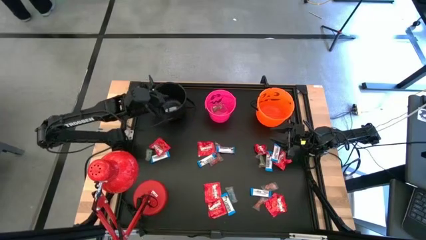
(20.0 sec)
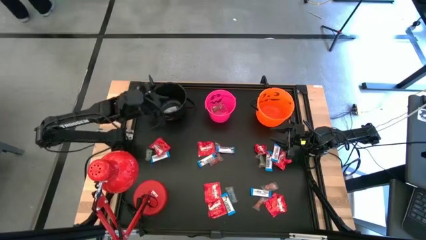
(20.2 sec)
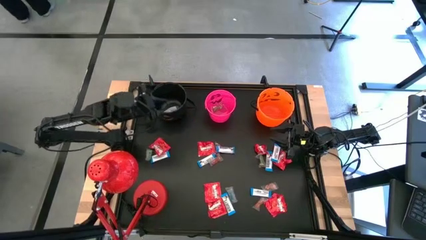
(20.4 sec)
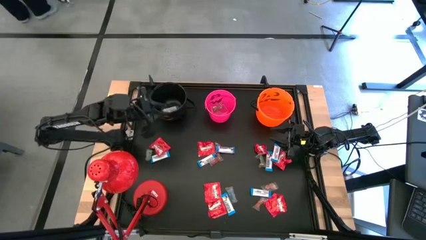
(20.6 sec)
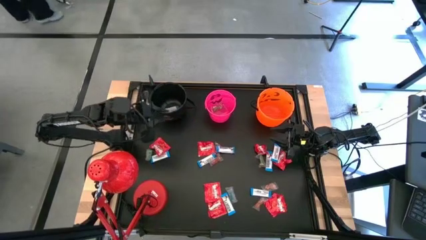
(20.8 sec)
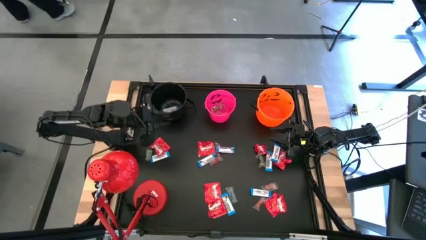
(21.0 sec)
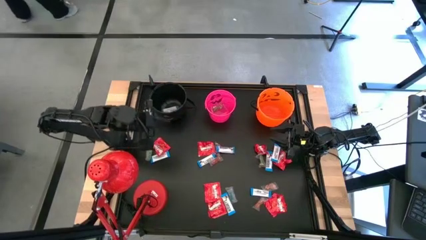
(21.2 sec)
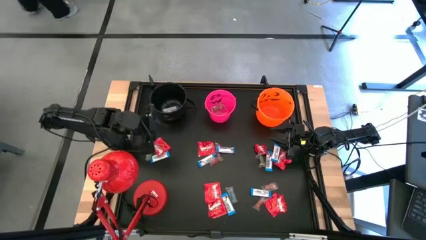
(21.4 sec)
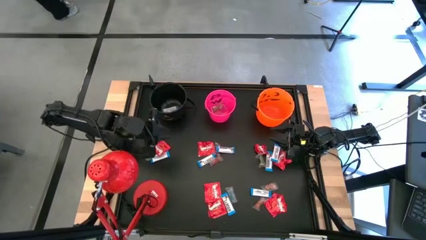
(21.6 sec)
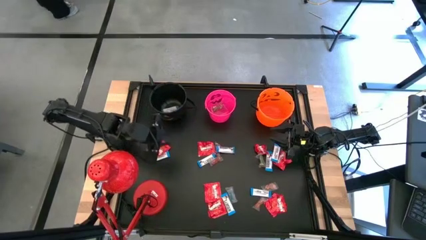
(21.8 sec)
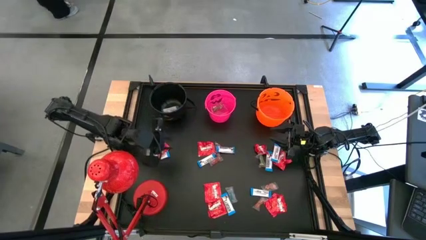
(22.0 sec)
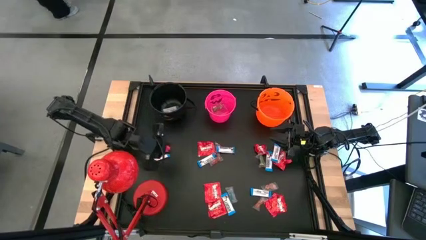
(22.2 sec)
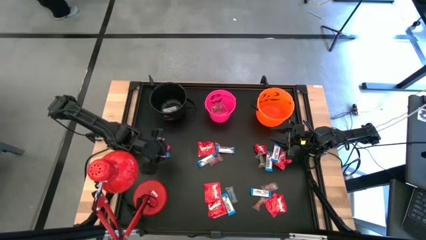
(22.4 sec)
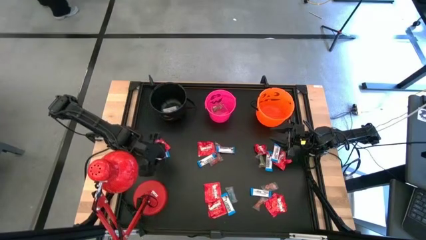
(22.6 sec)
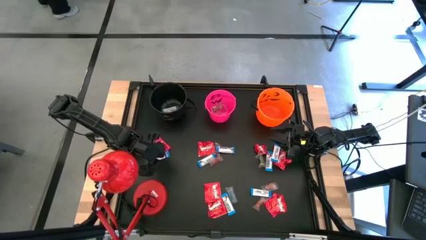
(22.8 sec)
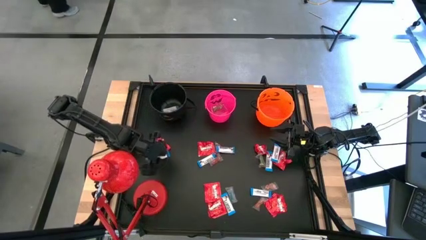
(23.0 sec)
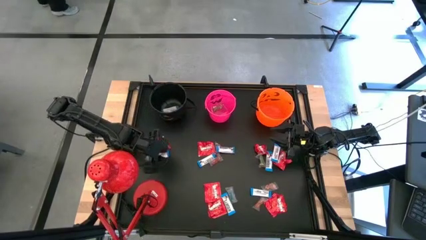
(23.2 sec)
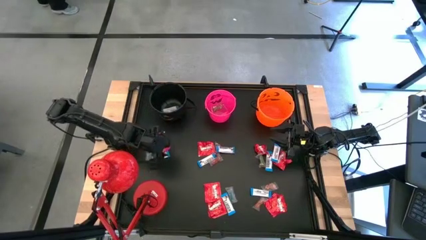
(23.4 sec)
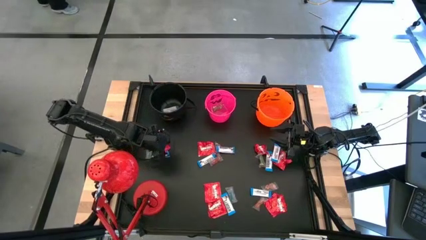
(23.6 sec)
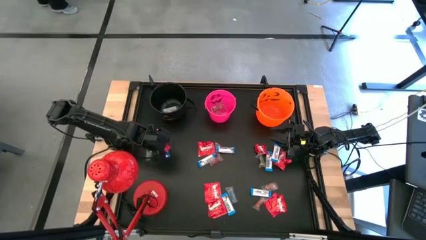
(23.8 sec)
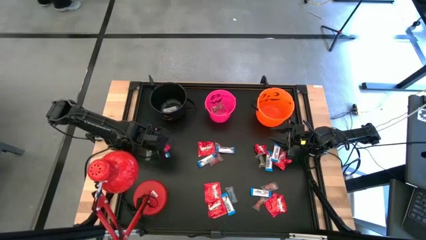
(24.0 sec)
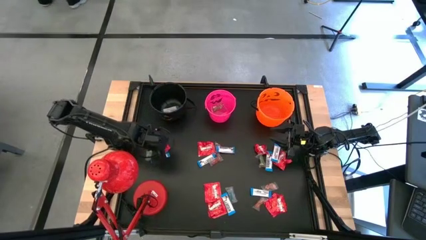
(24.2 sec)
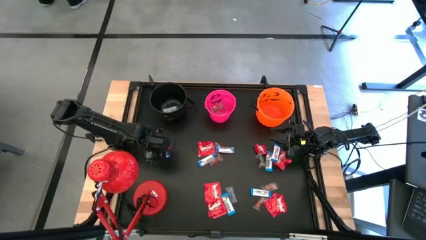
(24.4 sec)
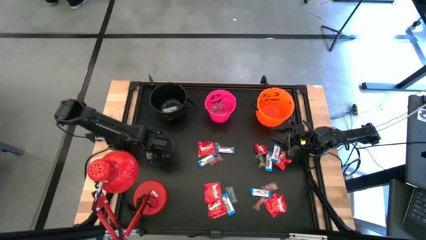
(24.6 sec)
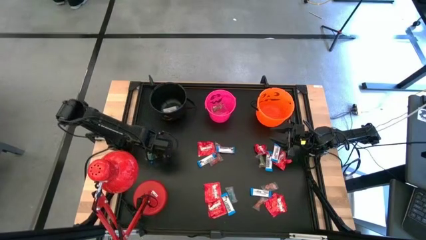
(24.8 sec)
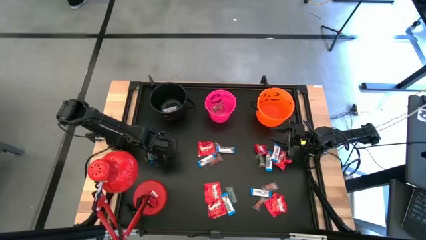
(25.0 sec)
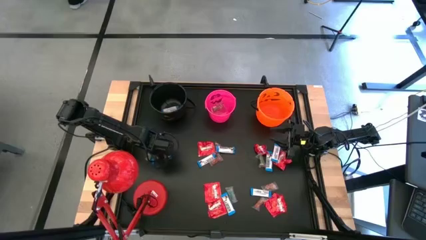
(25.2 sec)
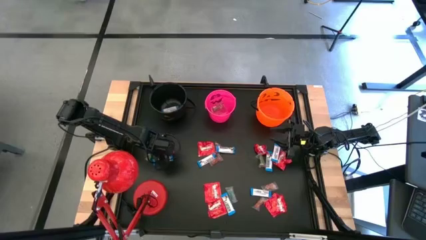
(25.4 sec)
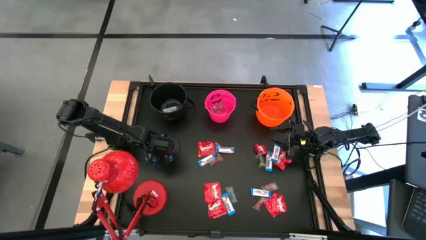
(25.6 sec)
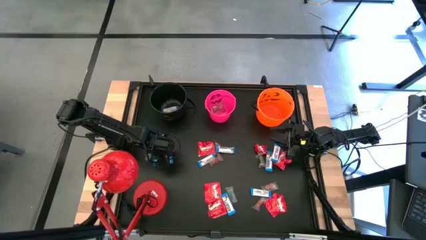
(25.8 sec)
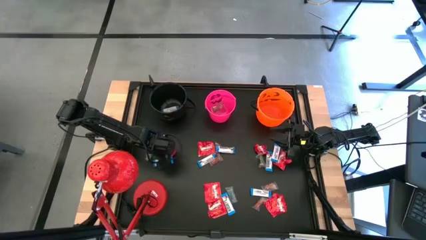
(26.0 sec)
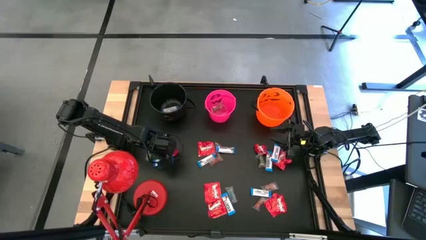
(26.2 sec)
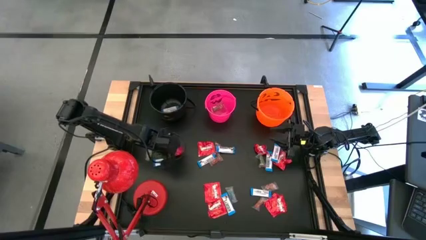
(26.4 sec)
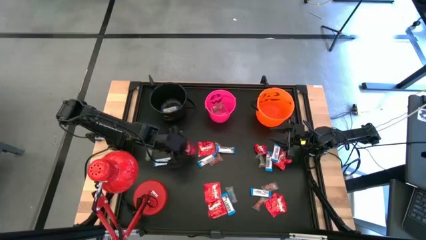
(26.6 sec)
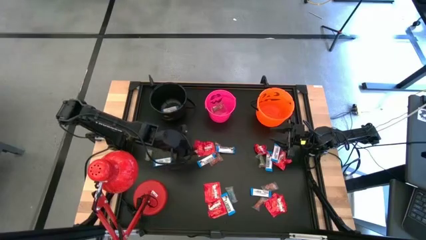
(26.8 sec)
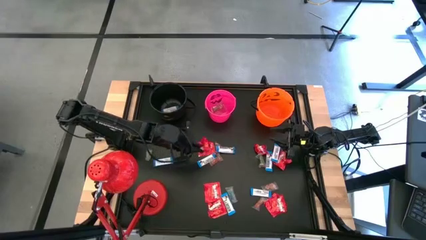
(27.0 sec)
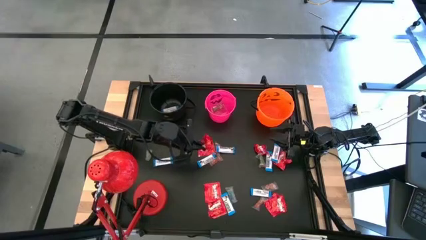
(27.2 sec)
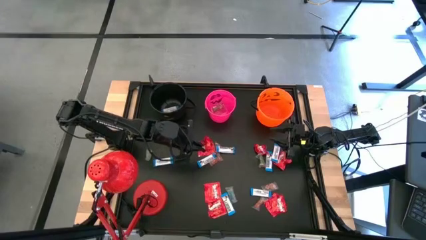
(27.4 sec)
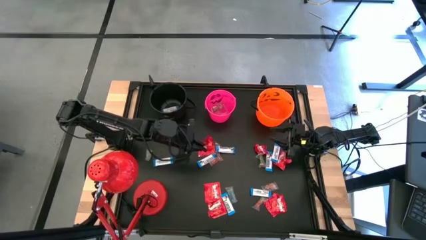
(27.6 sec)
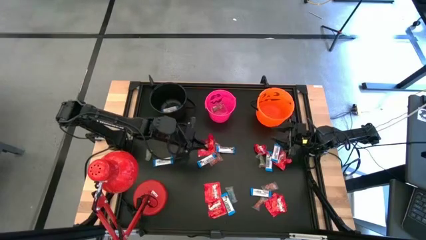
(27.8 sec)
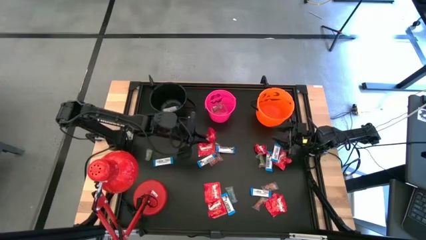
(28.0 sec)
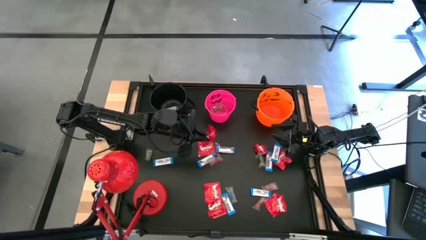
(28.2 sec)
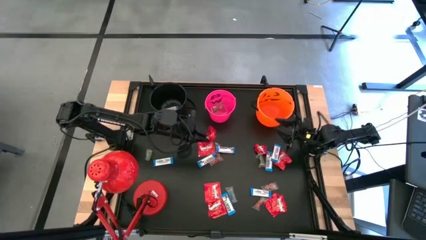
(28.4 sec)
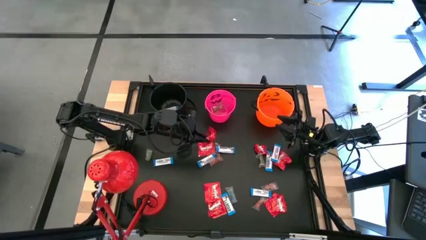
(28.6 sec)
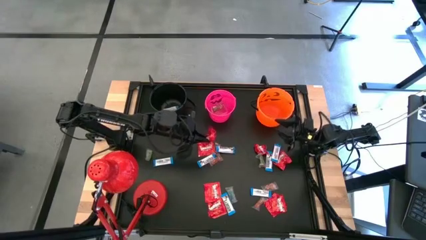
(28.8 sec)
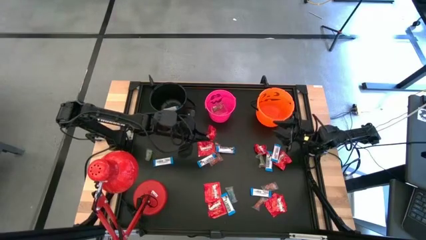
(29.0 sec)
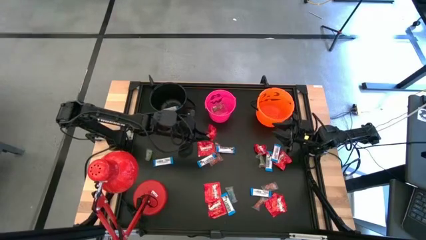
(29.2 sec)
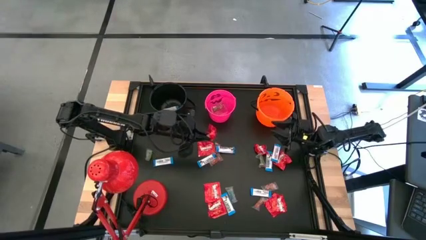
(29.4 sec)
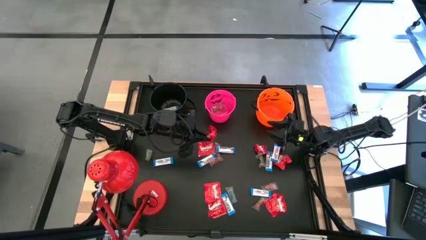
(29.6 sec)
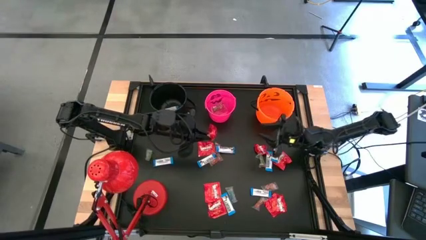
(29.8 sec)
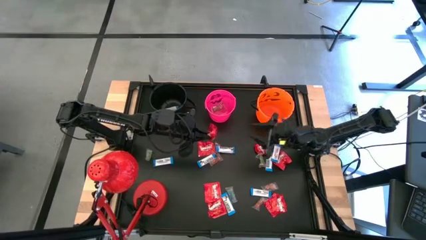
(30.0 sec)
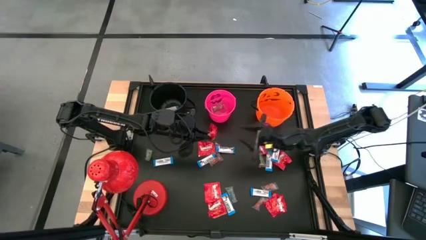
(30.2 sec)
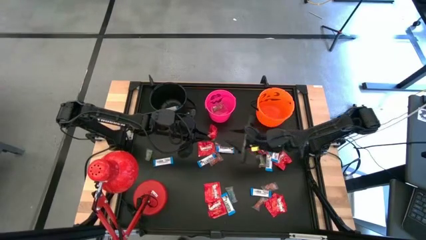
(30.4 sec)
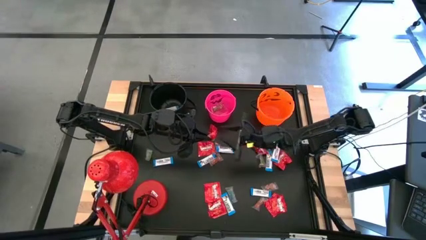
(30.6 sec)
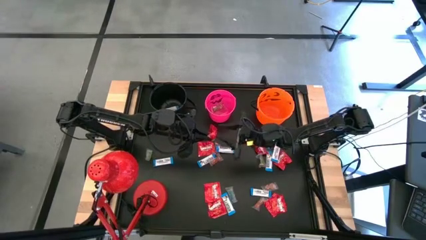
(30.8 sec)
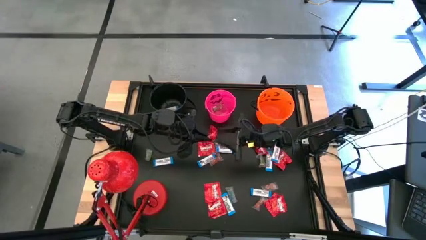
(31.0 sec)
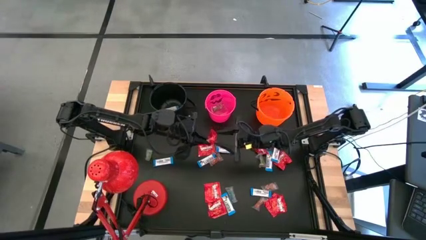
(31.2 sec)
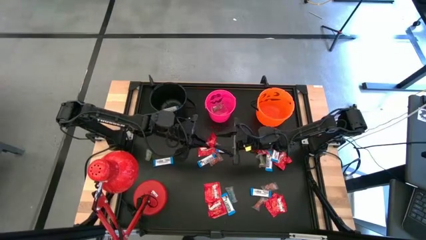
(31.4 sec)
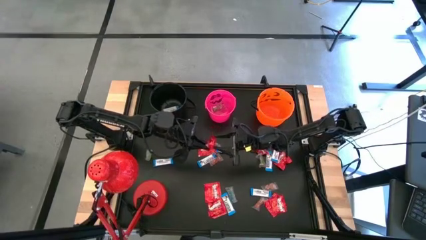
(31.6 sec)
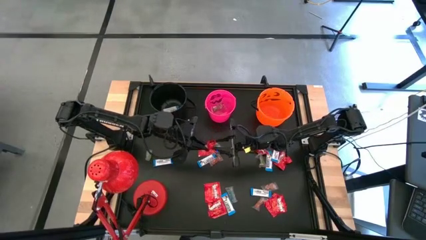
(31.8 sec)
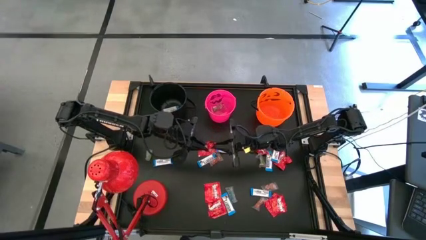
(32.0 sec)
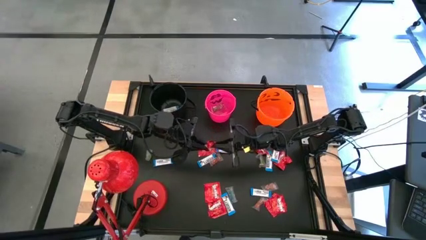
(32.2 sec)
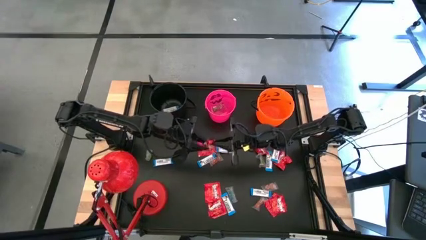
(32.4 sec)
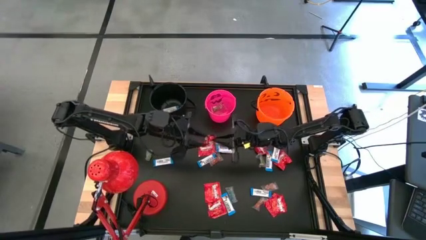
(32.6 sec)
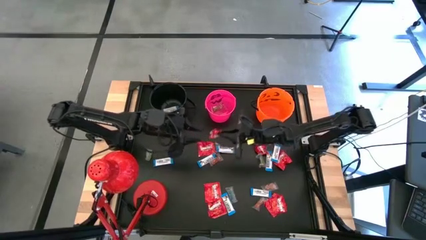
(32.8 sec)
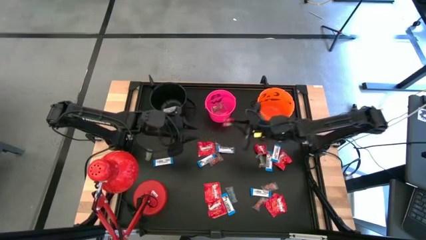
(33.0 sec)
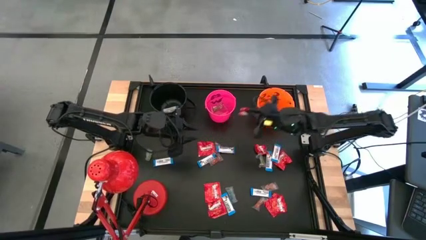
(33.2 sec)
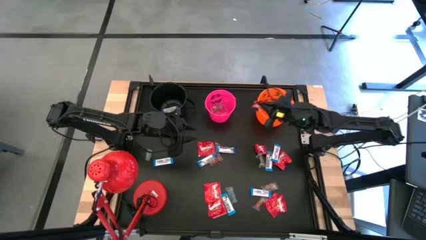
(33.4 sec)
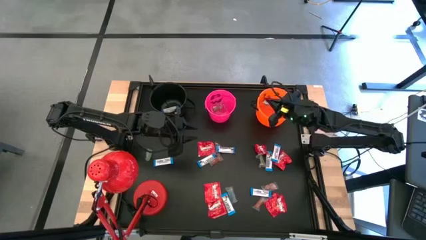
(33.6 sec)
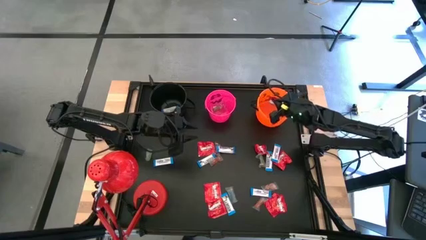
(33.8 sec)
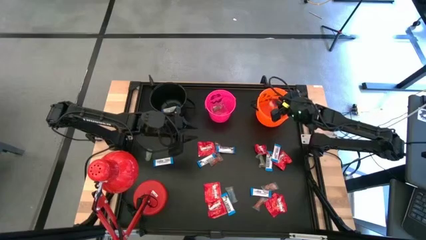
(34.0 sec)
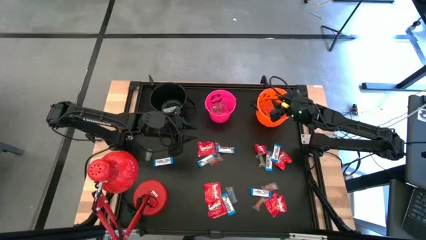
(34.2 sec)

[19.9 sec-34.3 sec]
Task: Organize candy in baskets
Put the red candy into the orange bucket

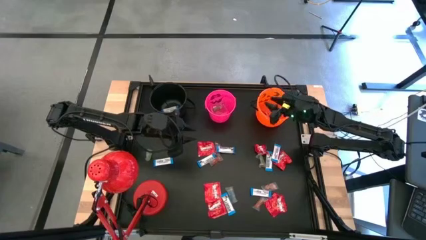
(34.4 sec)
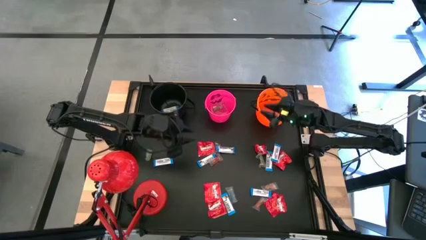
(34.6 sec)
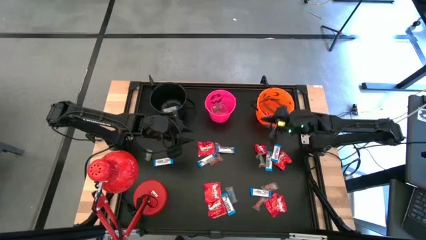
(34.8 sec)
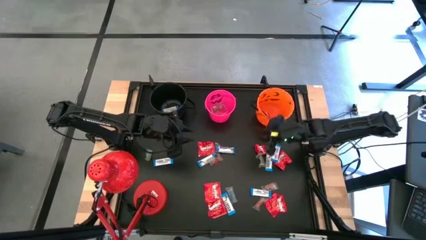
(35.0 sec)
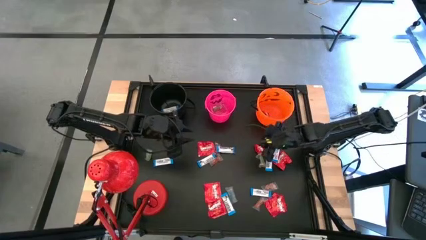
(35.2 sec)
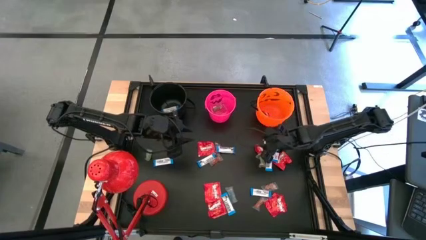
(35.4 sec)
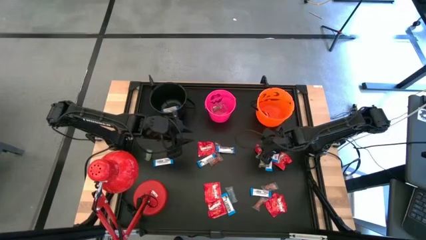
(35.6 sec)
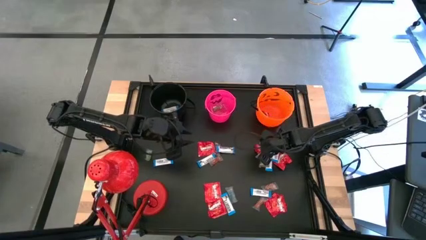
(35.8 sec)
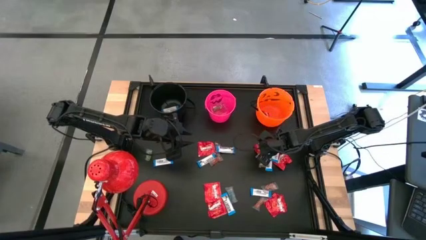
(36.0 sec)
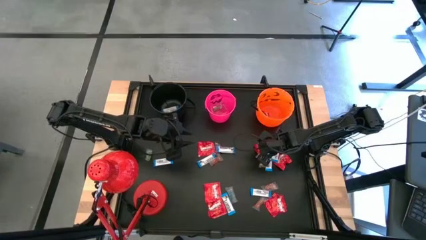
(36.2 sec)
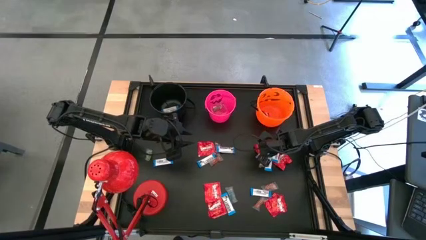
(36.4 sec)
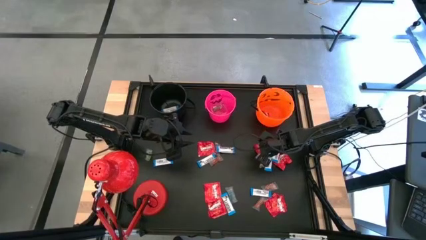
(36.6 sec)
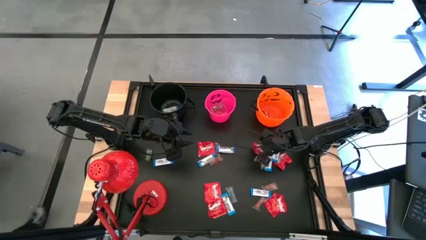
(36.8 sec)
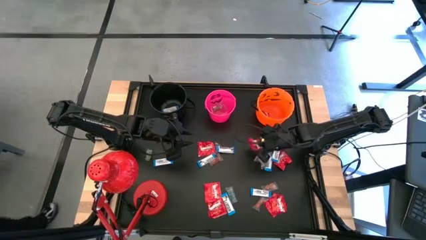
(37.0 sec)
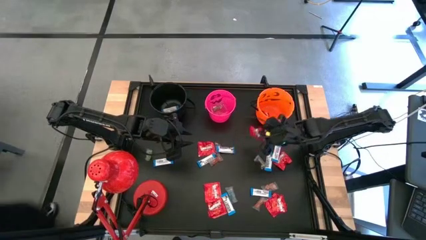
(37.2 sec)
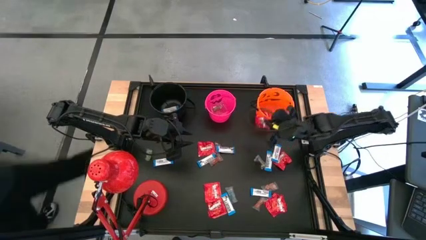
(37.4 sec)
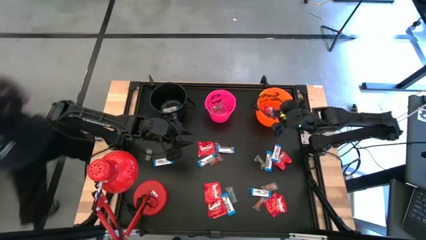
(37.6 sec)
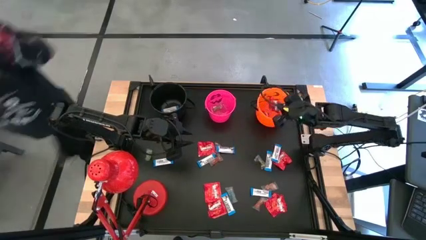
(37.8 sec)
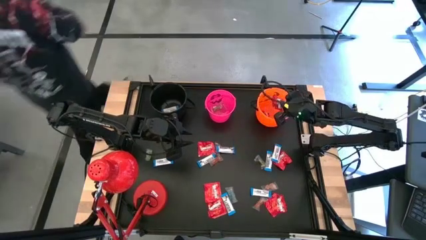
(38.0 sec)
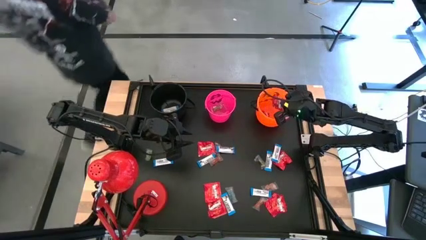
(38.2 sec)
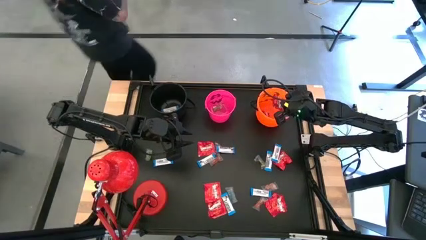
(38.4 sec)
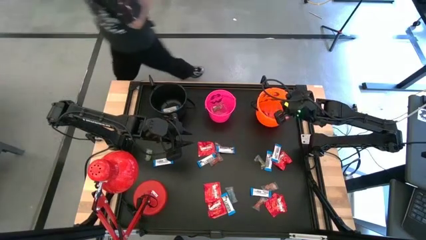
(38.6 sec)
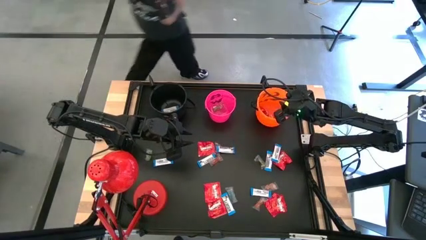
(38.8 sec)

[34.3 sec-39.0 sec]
Put the red candy into the orange bucket
